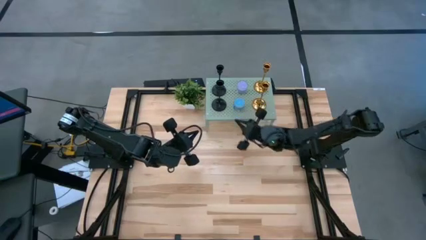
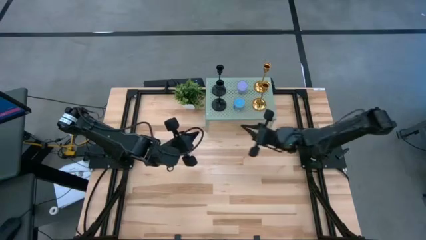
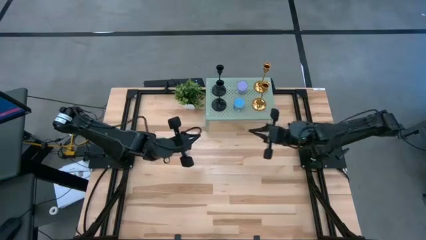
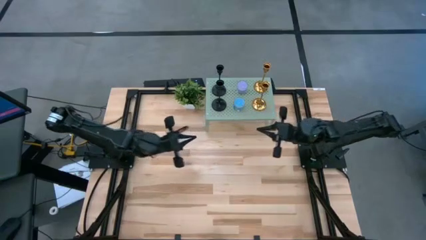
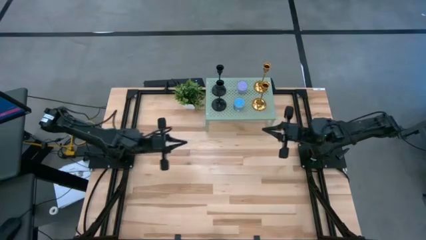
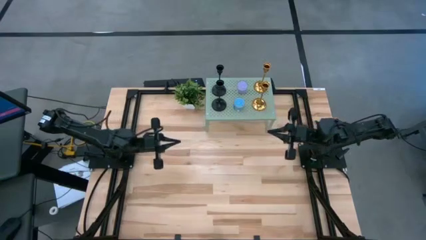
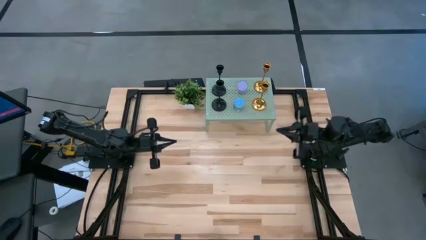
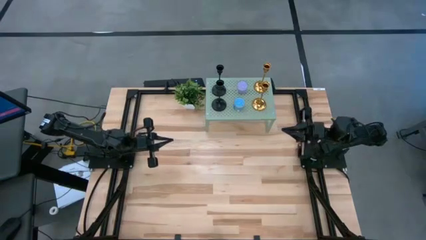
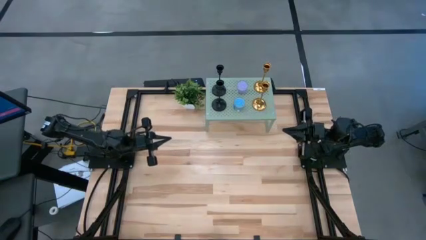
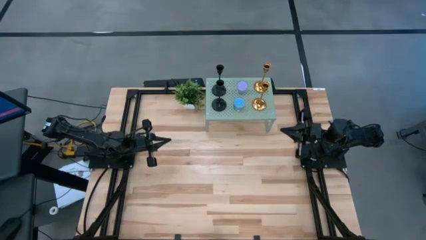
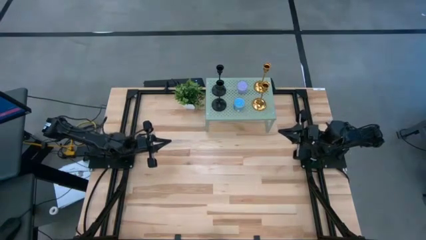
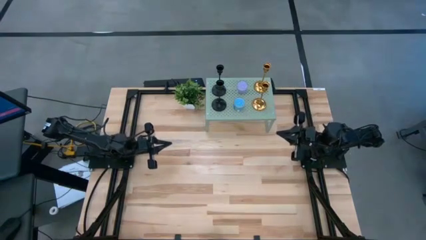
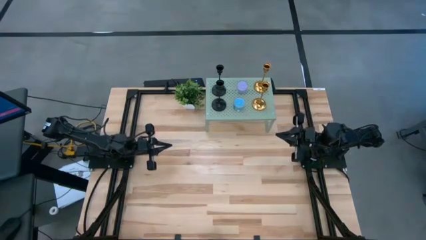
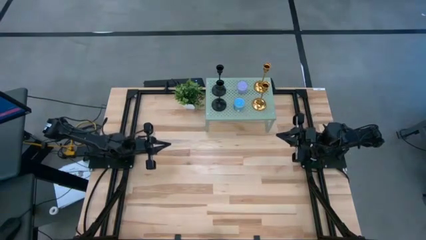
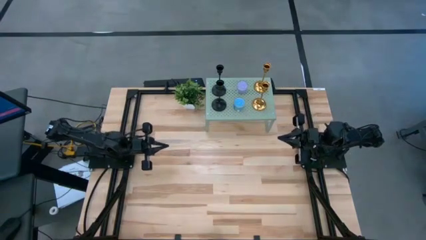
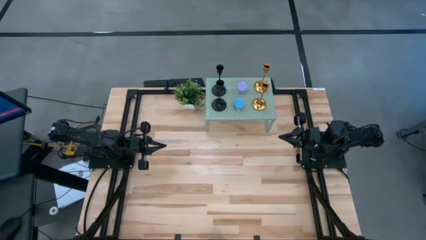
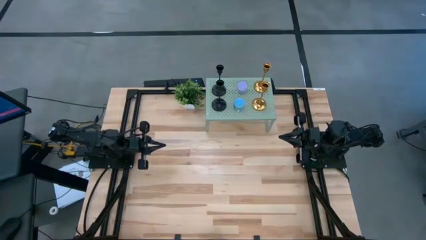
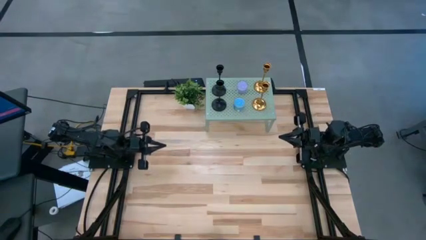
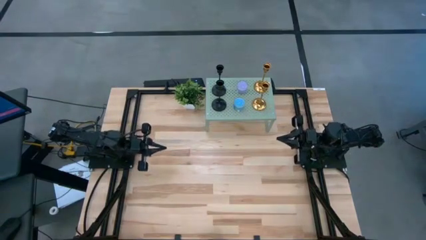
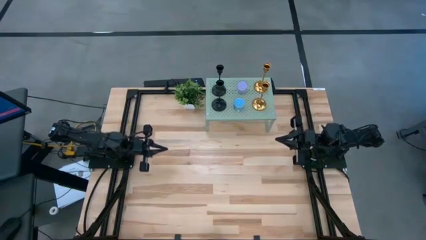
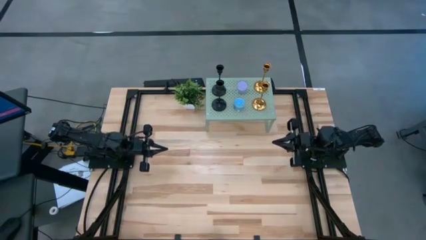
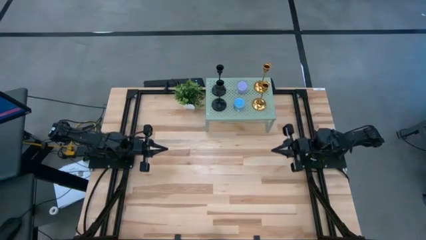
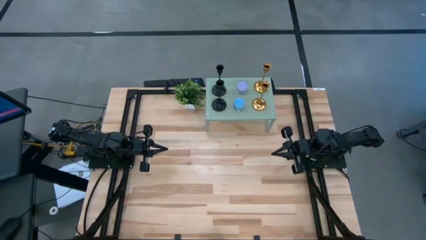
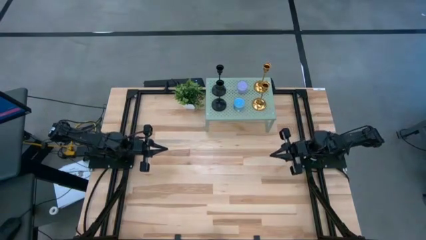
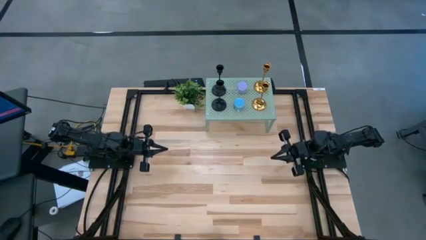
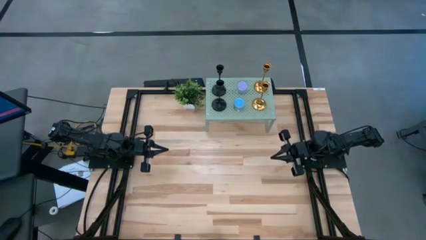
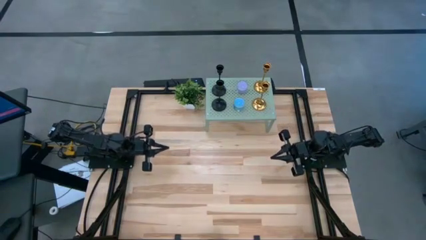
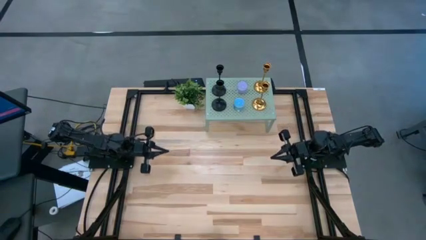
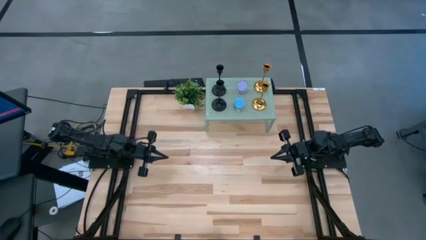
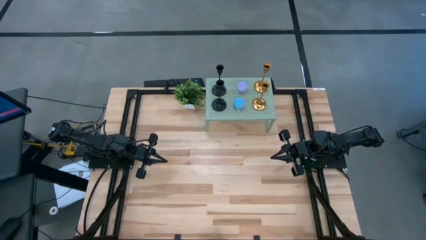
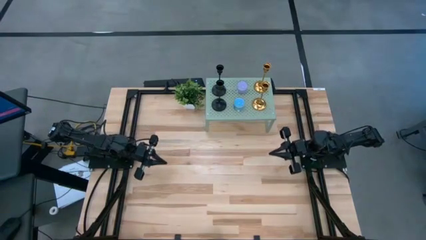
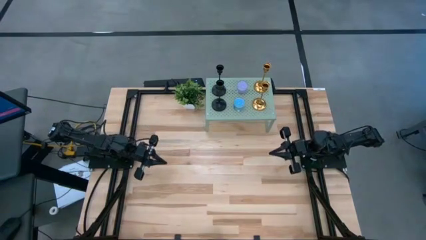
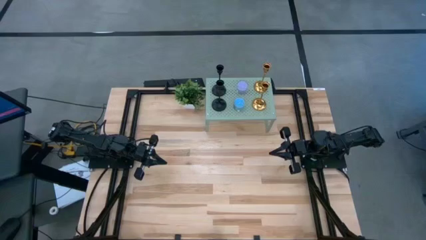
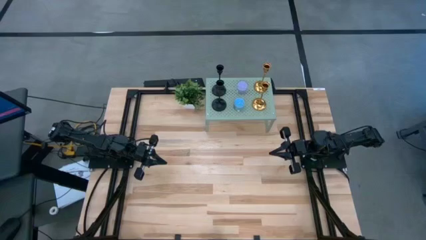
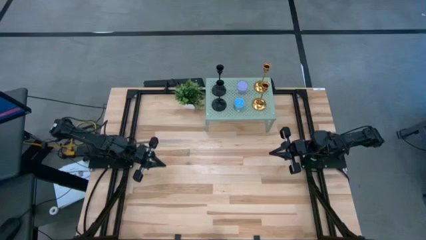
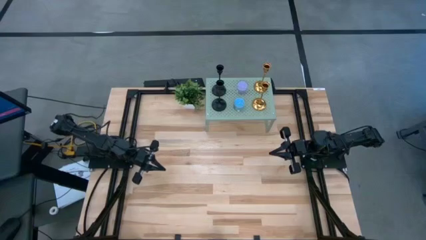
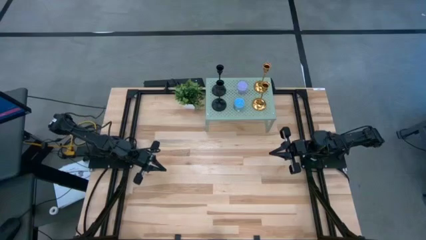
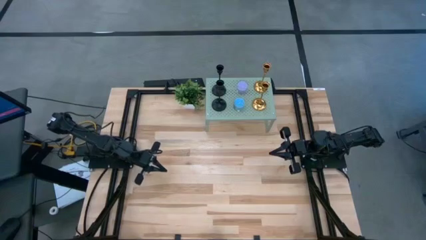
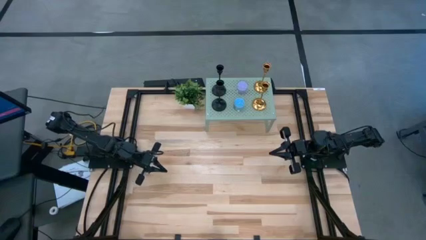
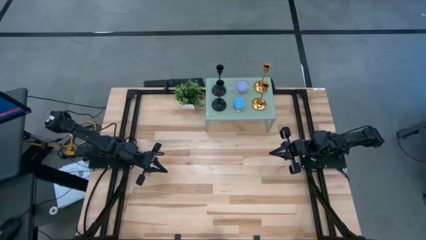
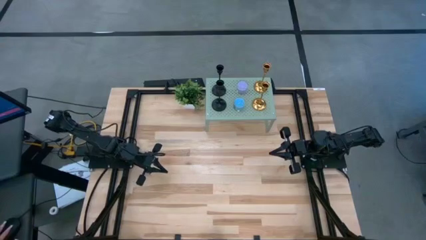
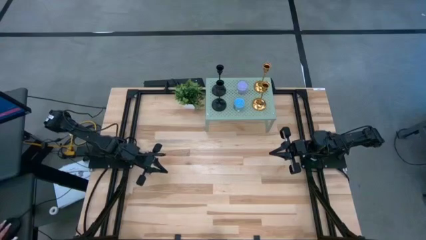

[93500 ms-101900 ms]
Task: Pick & Place candle stick holders
Return to Home Position

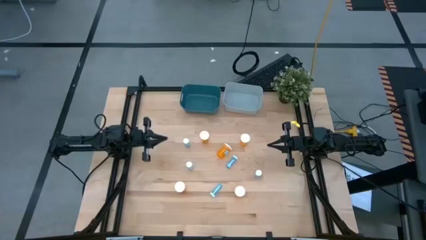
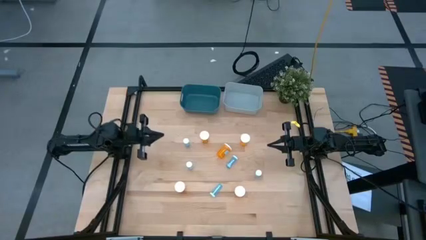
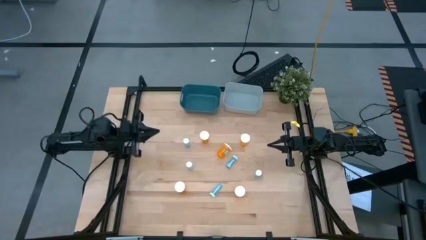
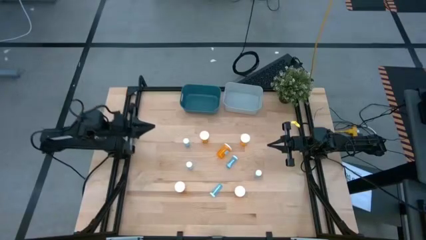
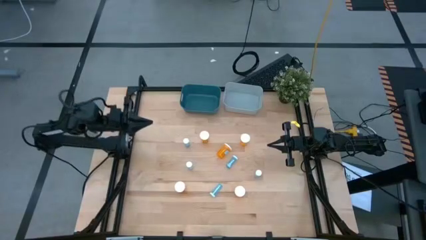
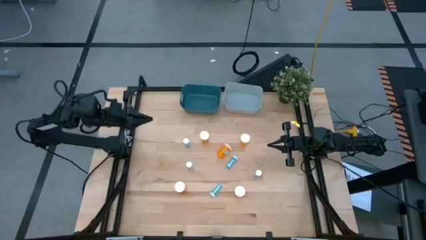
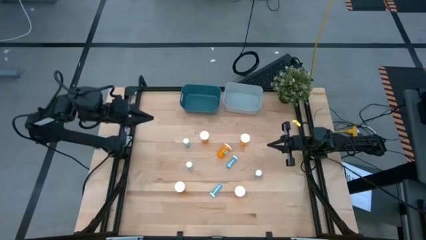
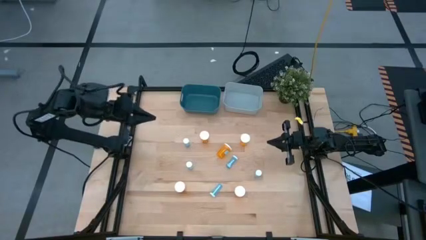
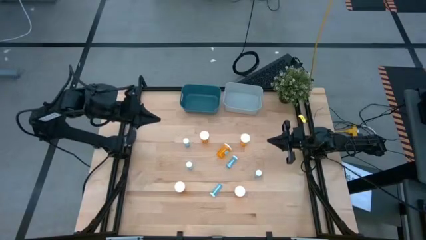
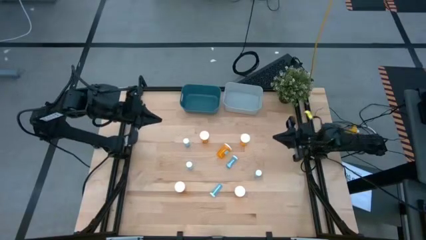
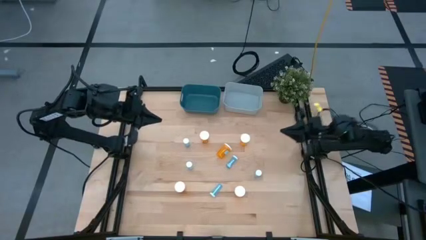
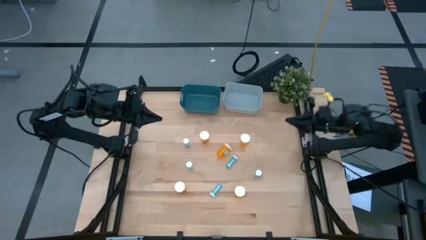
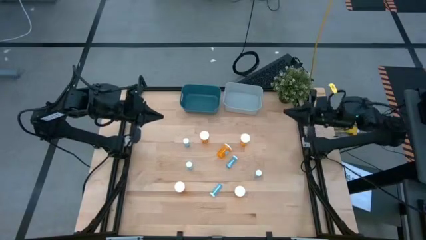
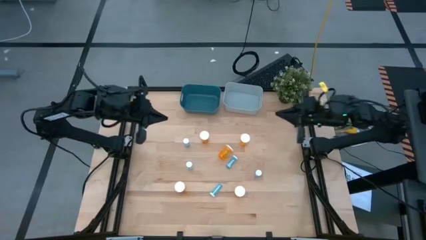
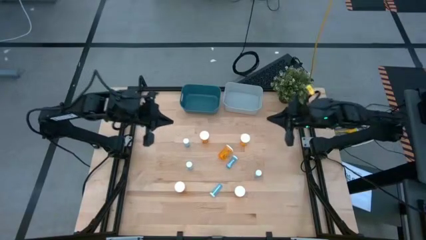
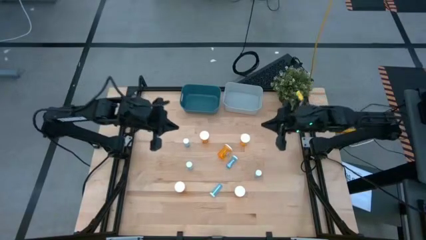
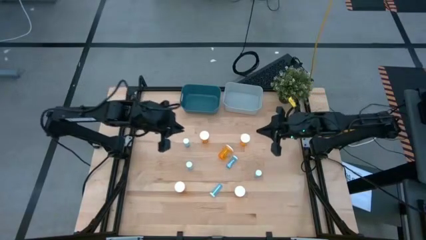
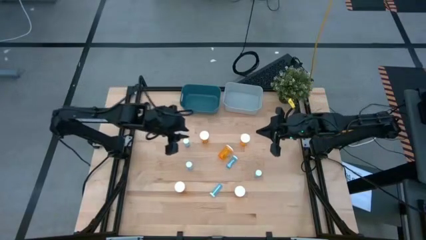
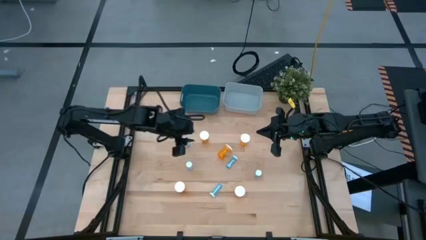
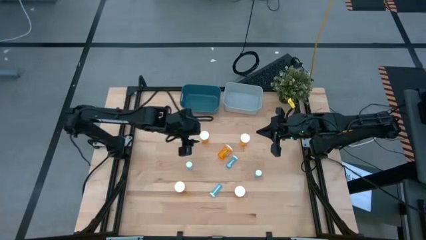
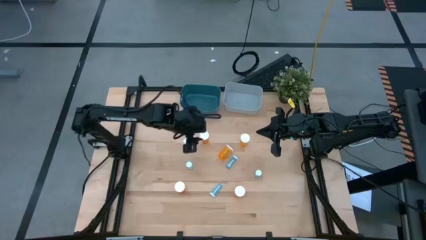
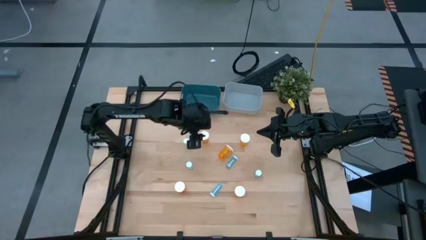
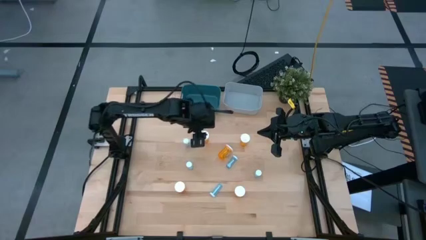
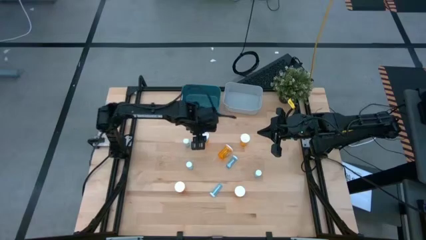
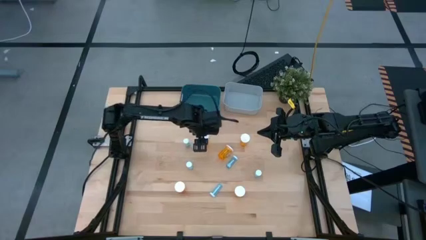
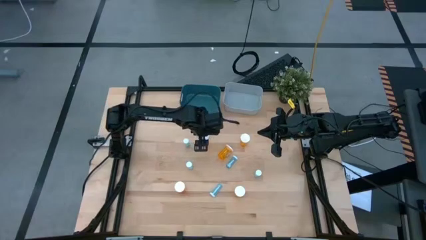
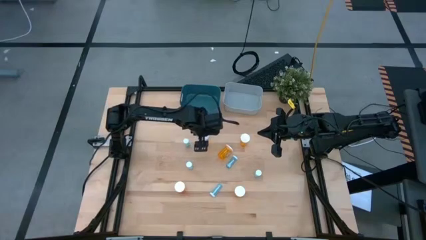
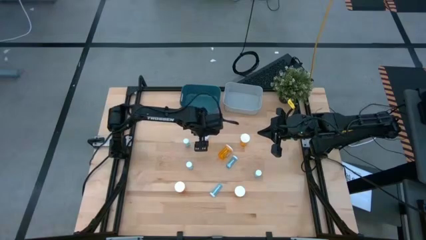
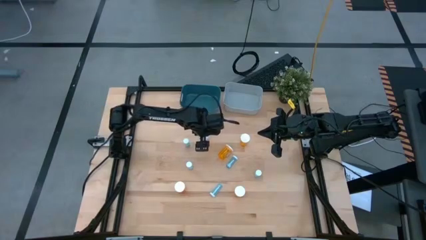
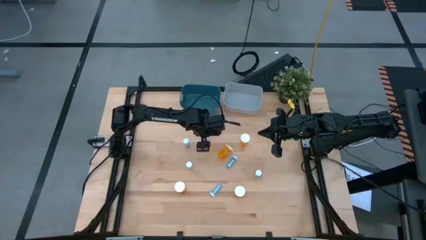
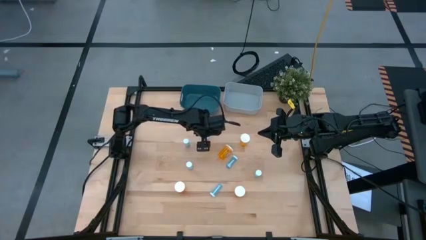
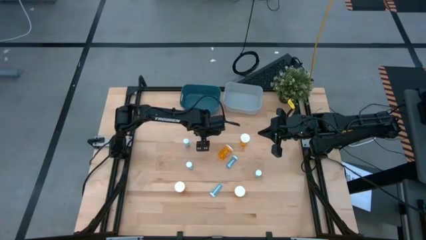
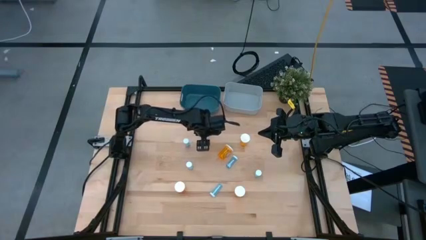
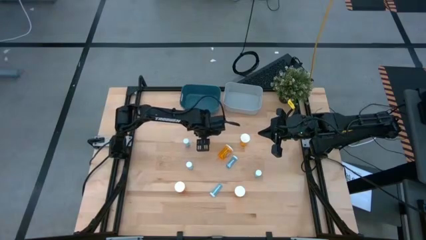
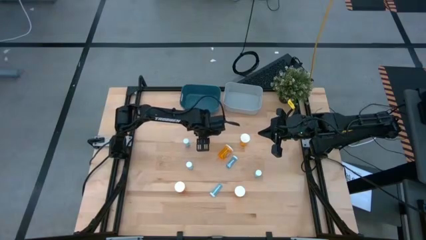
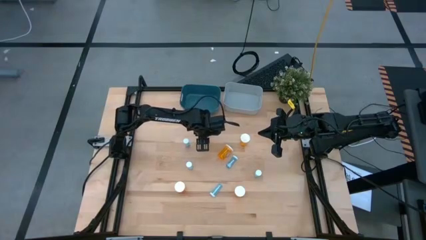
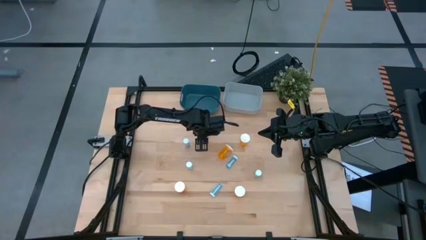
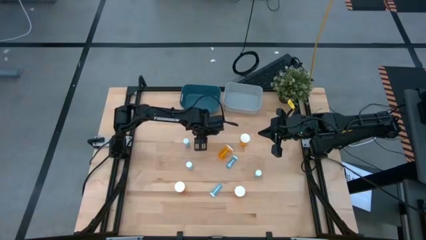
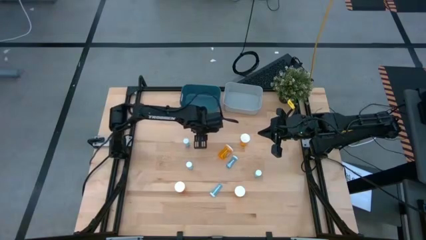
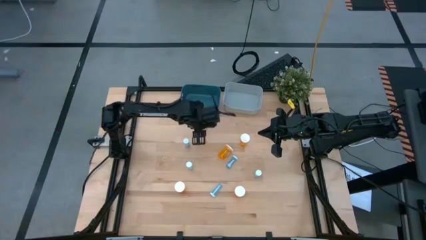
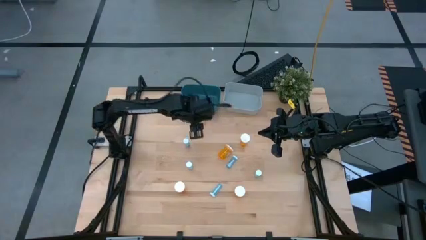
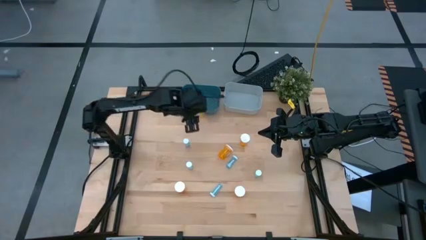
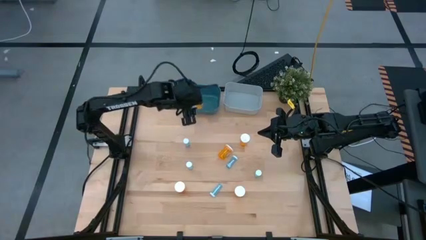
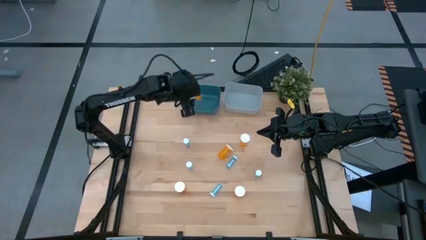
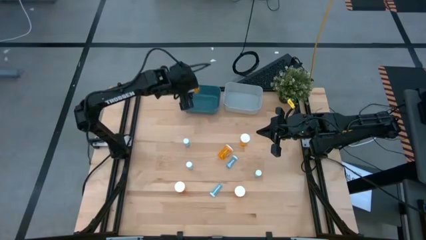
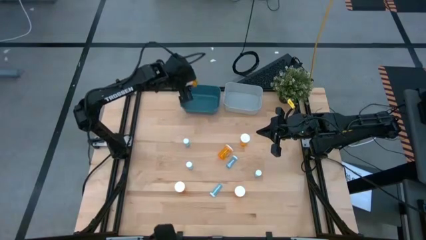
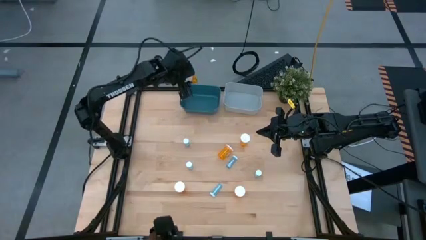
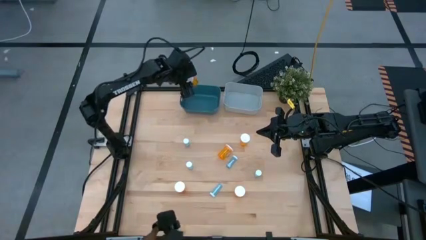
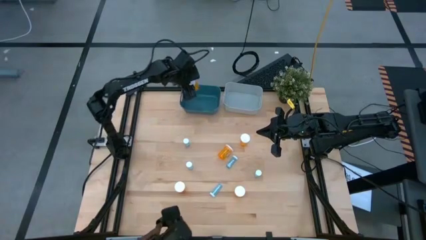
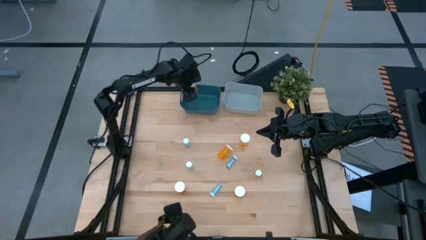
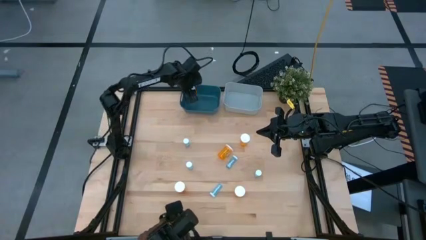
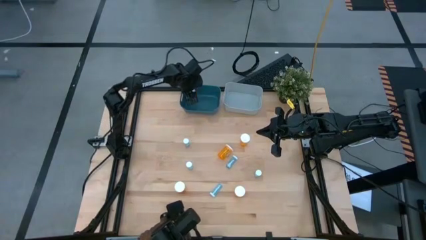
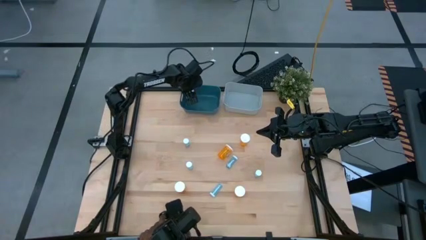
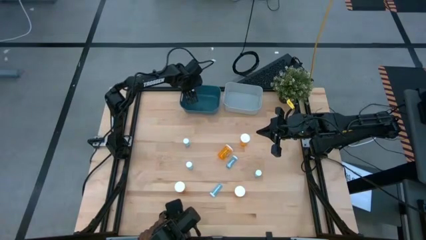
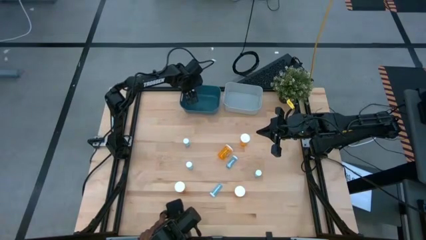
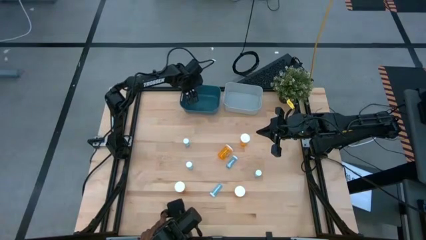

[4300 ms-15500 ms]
Task: Pick and place medicine bottles into bin by pill shape (circle, oval)
Put the orange pill bottle into the blue bin
